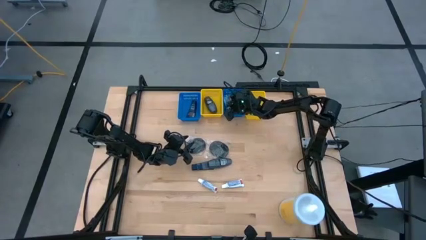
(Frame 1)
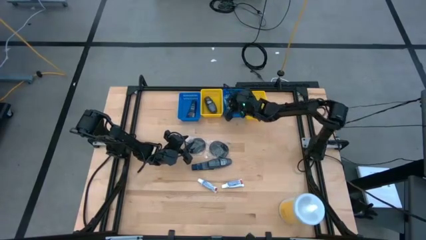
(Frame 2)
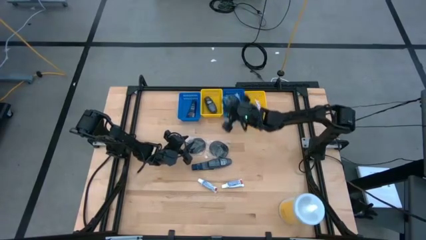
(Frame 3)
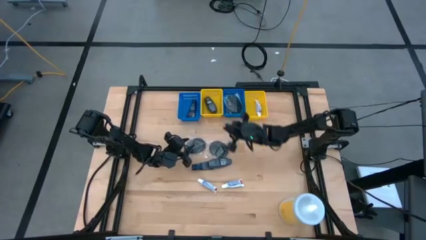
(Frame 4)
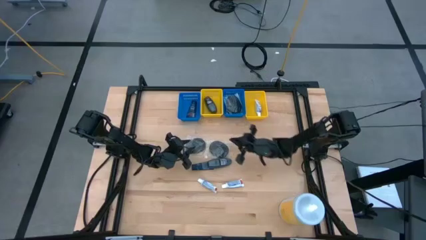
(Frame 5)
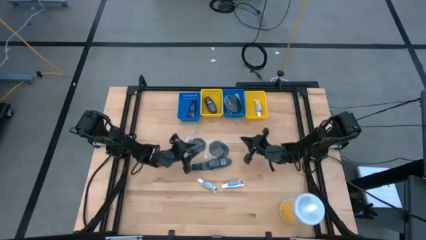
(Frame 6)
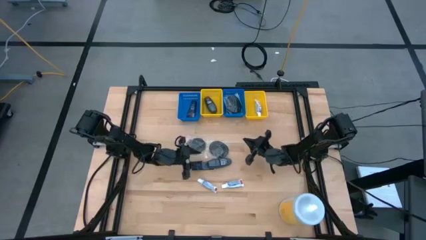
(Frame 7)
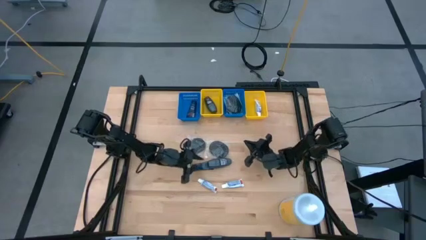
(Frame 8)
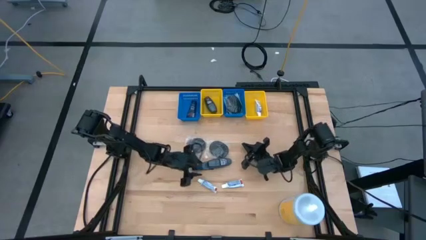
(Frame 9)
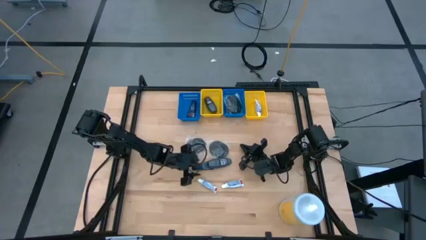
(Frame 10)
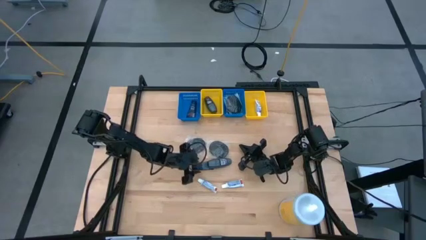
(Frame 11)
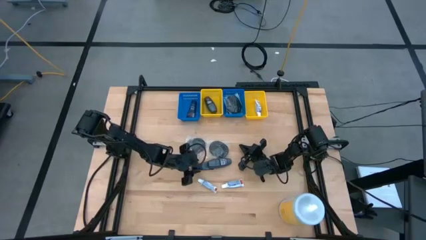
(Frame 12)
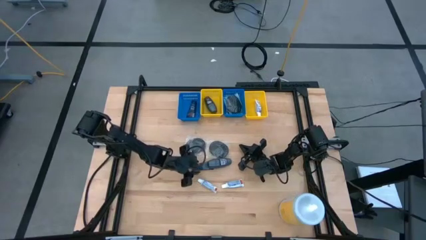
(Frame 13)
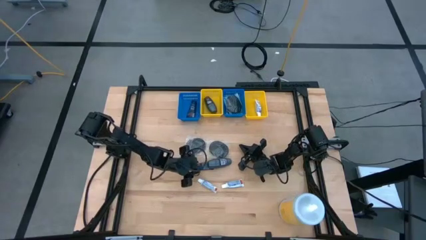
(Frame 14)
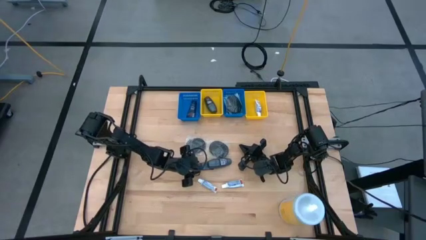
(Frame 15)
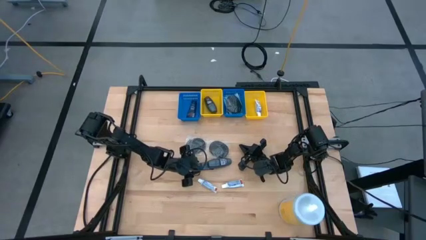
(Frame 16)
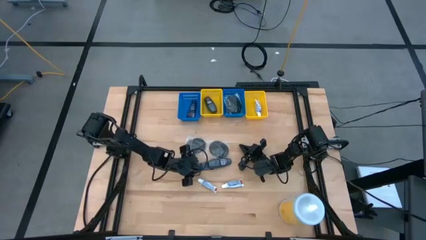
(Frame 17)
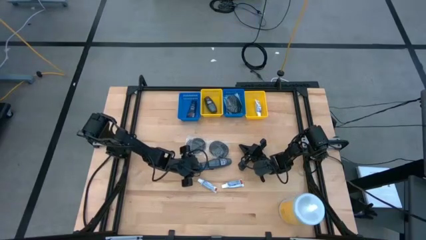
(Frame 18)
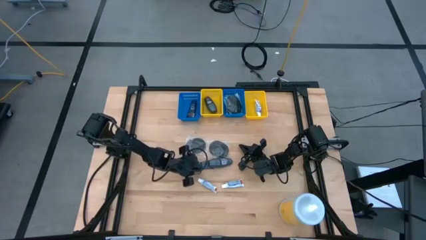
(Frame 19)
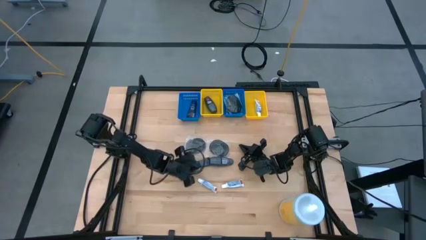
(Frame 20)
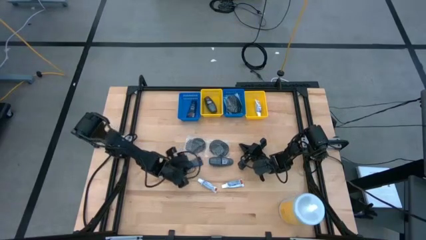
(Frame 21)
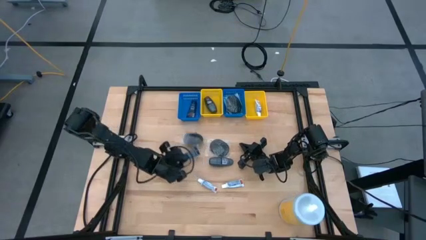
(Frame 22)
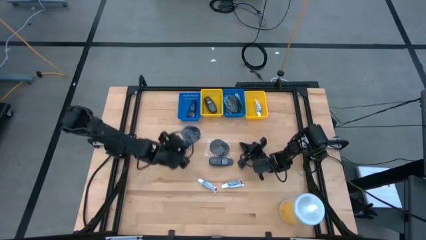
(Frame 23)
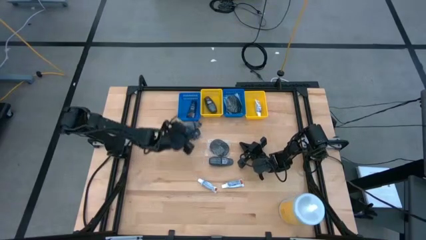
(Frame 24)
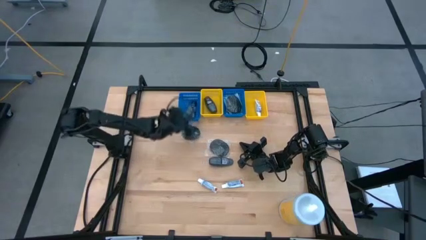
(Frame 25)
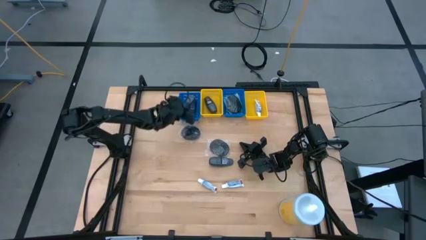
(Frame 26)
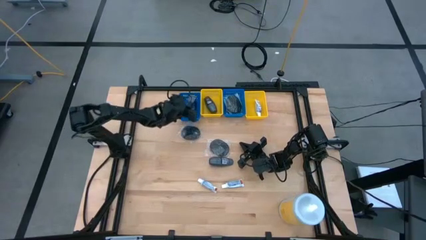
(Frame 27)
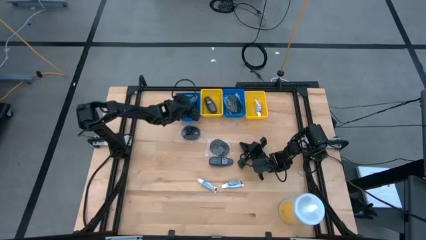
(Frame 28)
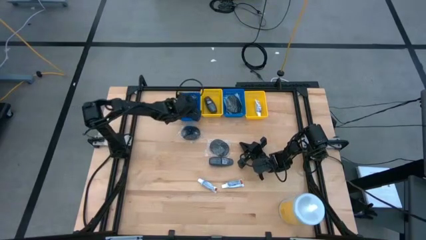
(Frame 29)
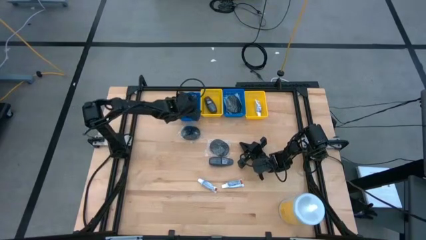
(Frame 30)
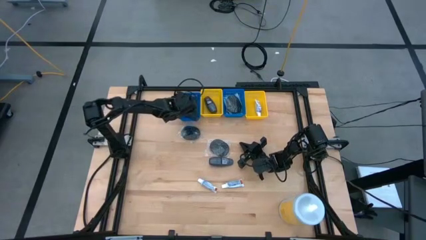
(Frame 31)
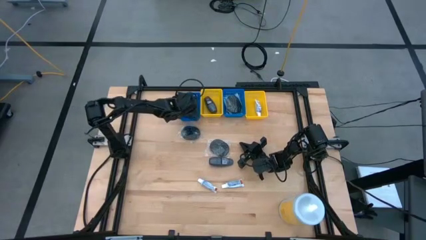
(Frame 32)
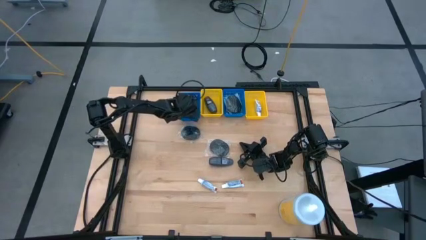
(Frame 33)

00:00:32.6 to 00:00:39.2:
Task: Pick & Place Travel size toiletries
Put the blue shave cream into the left blue bin

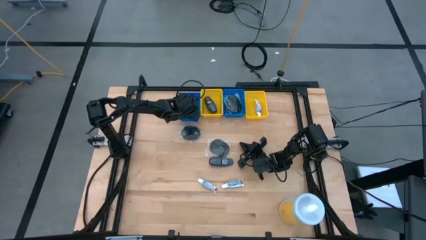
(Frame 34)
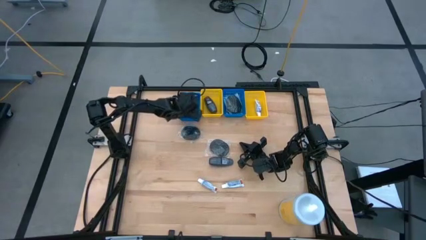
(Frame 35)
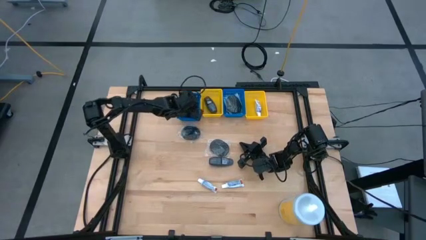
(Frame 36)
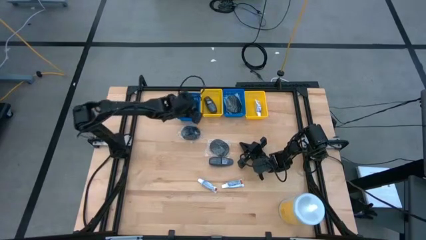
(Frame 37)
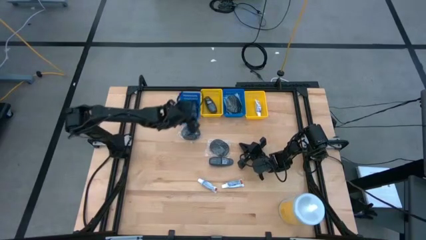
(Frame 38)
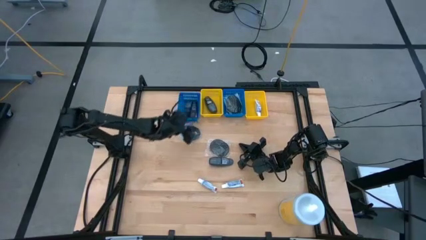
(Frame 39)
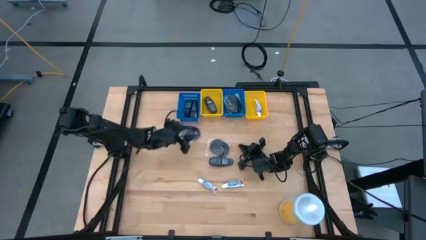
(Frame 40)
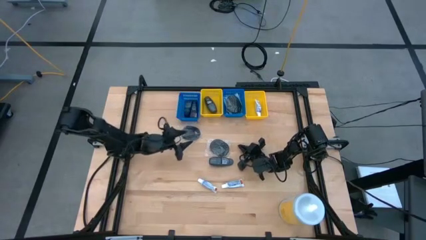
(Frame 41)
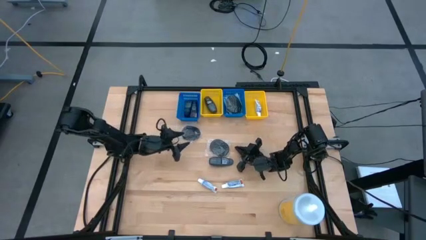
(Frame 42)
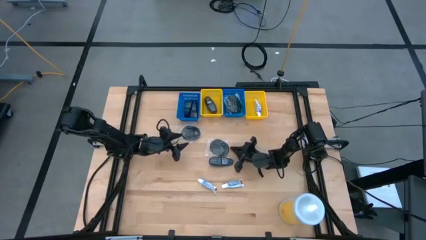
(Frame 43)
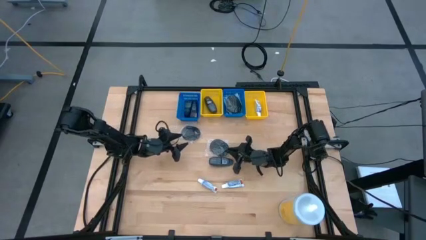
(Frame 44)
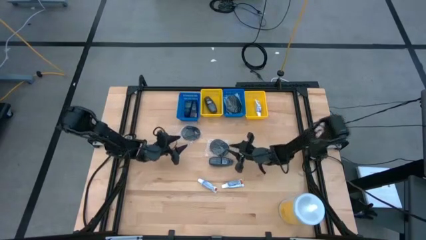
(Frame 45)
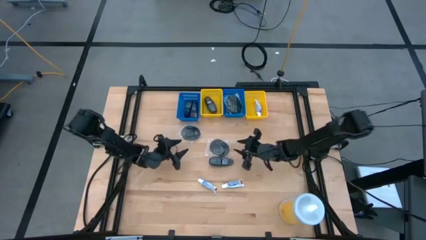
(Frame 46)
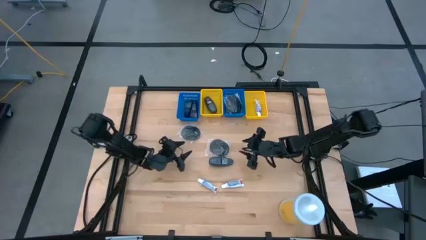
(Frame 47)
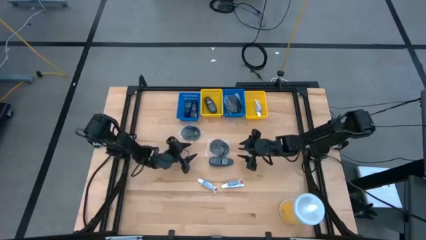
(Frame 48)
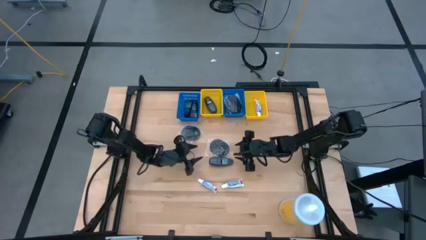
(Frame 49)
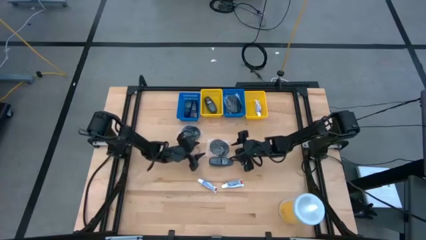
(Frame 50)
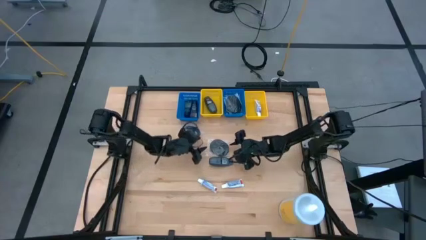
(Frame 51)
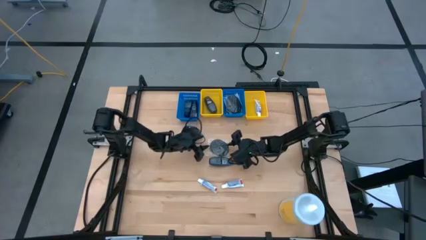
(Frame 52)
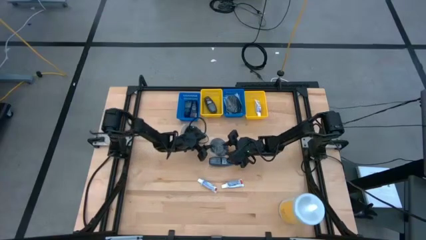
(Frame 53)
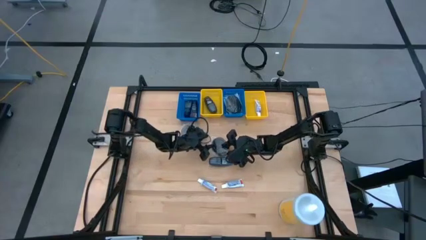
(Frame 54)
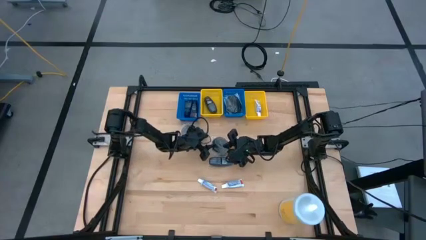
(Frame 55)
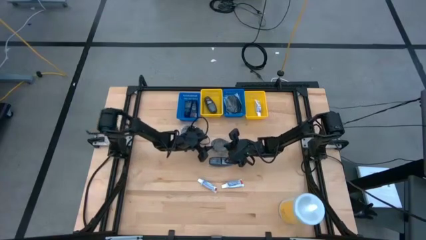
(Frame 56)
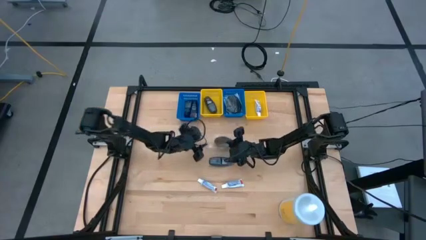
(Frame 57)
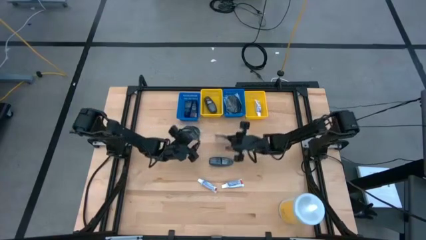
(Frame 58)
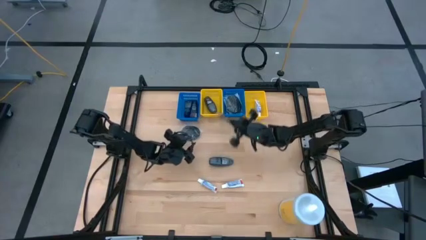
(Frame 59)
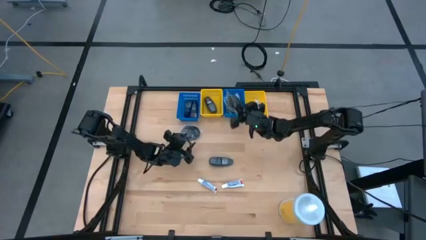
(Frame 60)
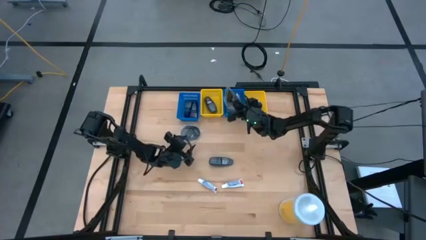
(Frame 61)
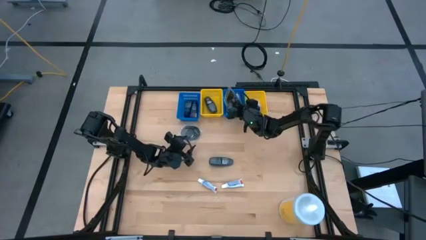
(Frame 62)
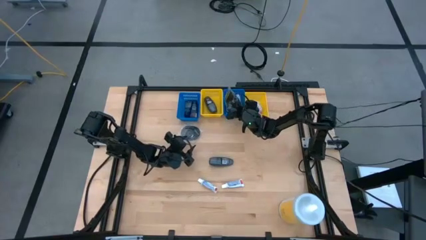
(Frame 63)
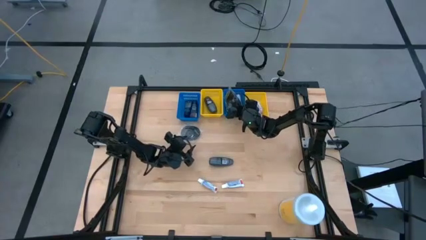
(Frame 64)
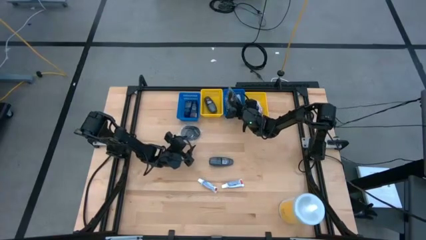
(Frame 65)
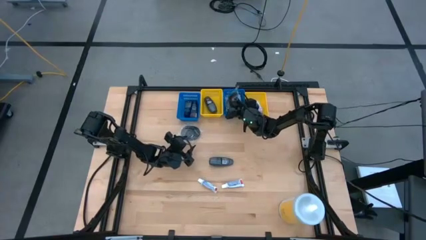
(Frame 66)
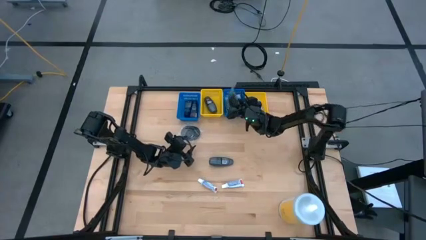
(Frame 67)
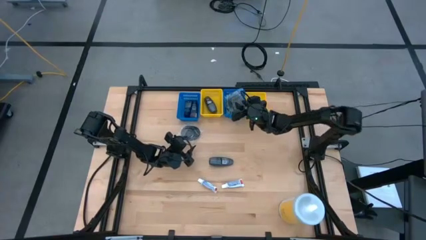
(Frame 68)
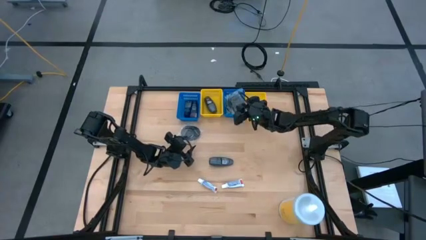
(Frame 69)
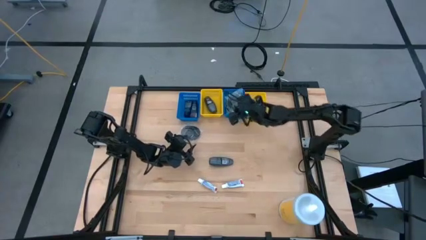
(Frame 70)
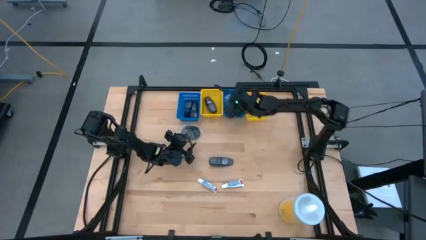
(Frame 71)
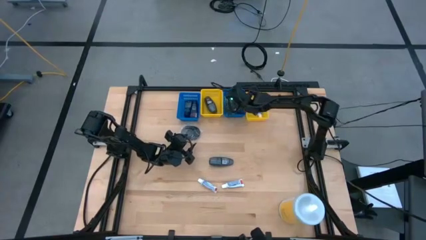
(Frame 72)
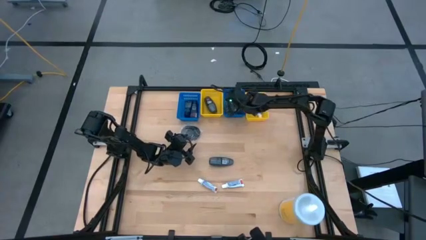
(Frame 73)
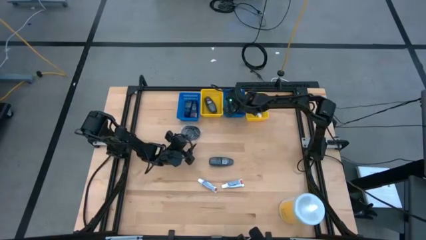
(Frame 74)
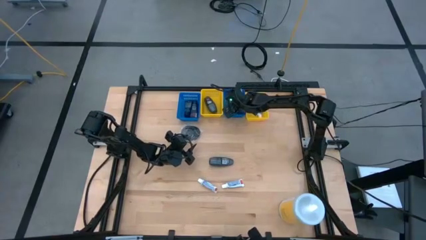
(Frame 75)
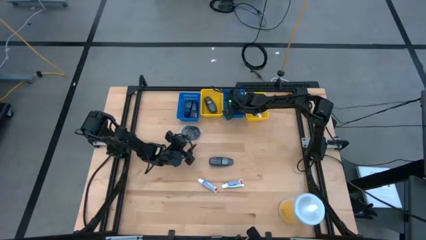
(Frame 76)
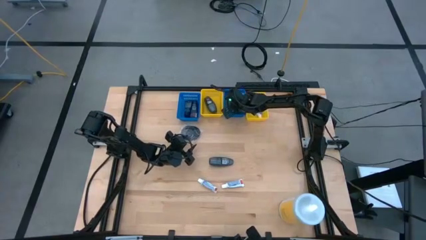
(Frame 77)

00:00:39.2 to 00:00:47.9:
Put the black hairbrush into the right blue bin

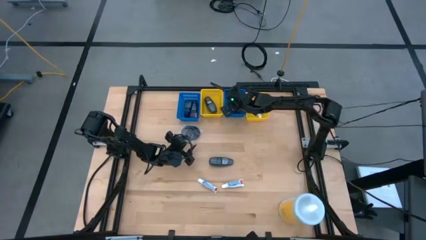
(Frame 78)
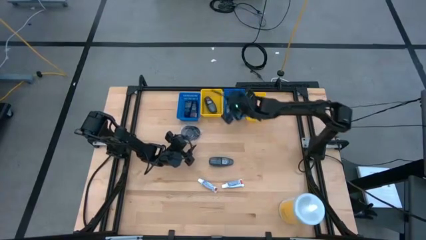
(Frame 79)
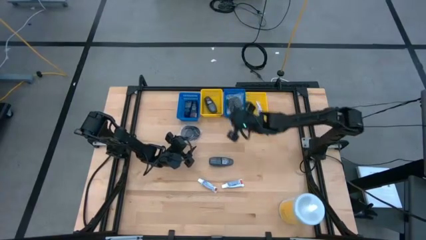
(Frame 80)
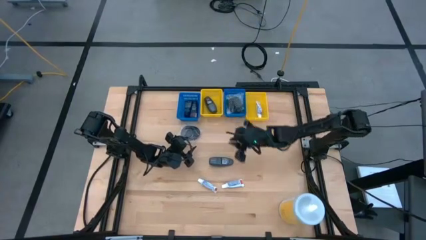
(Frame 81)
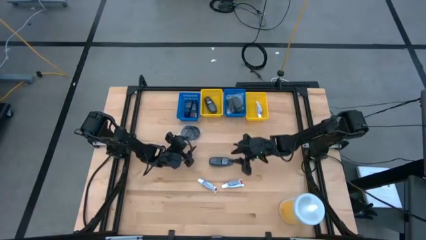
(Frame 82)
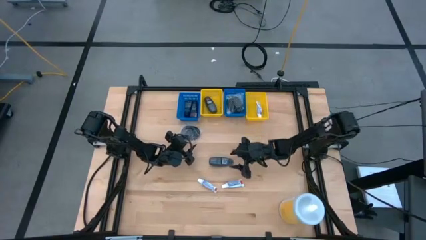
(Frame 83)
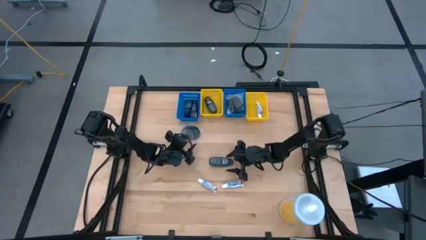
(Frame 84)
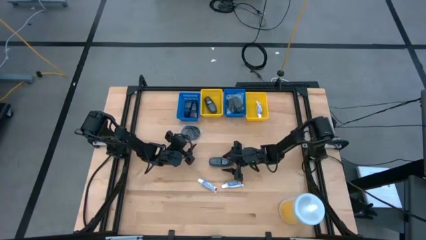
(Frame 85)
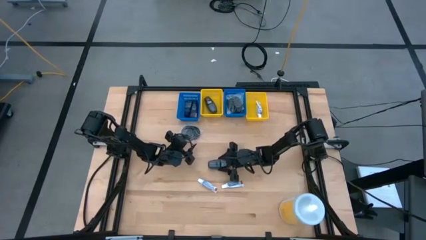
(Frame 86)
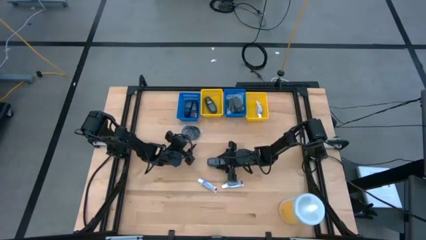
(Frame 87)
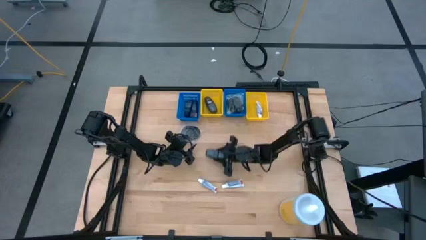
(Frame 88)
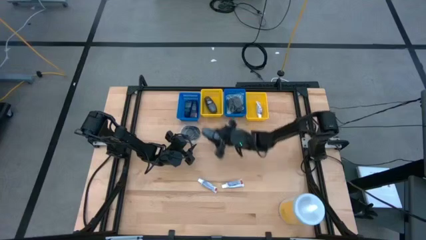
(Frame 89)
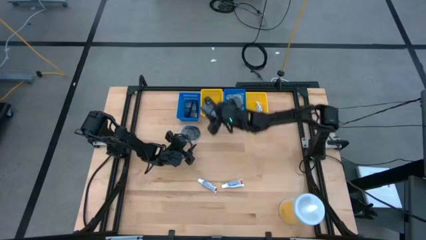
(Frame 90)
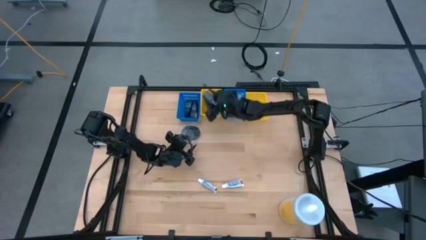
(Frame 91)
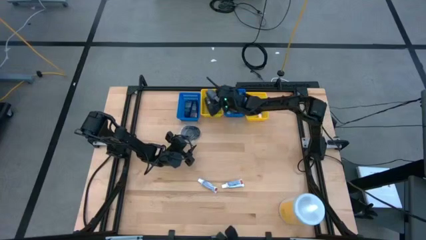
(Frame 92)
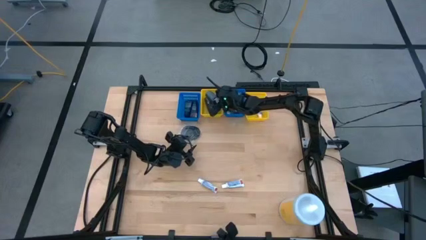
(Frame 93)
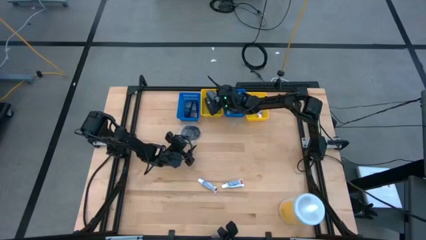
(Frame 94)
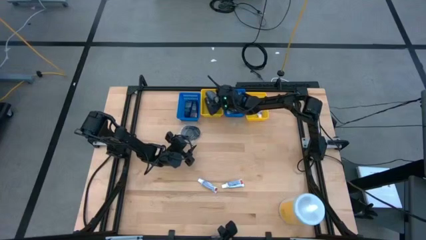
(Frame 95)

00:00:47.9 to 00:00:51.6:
Put the black deodorant into the left yellow bin
